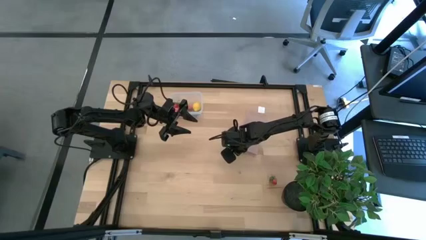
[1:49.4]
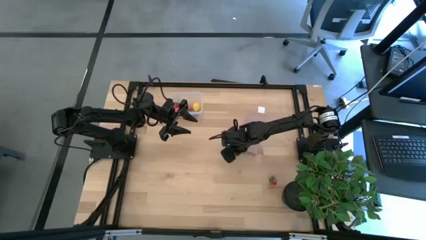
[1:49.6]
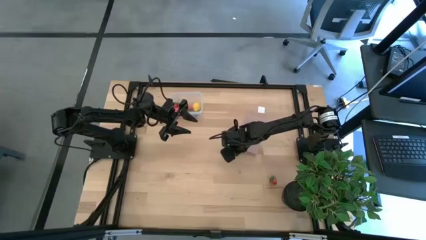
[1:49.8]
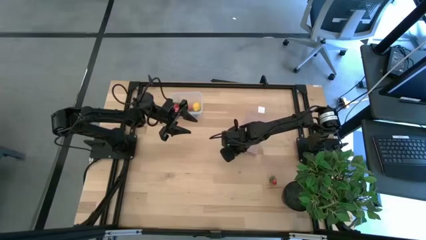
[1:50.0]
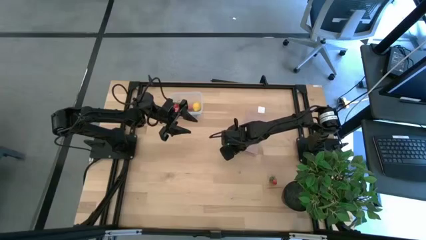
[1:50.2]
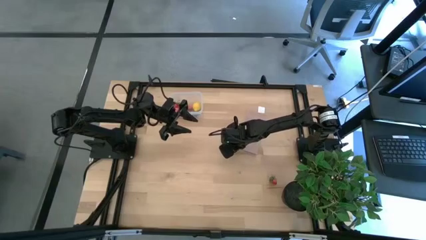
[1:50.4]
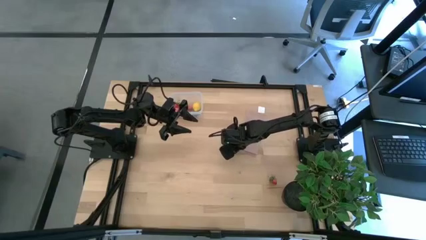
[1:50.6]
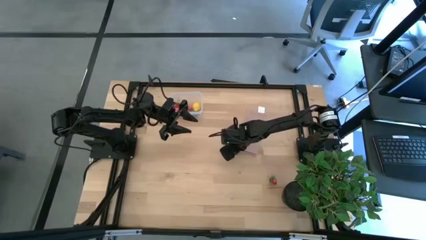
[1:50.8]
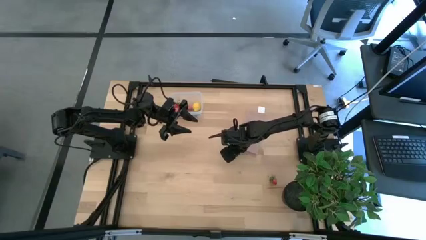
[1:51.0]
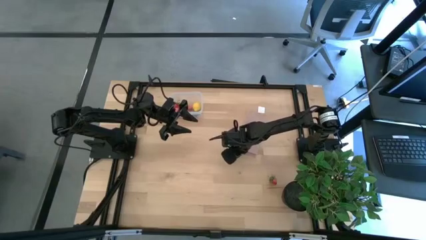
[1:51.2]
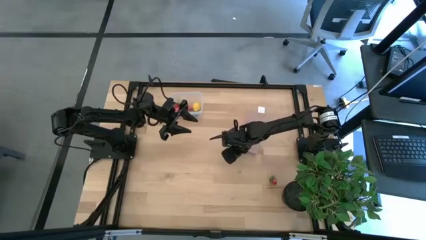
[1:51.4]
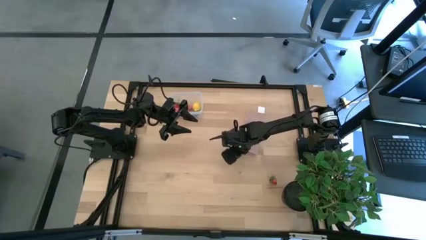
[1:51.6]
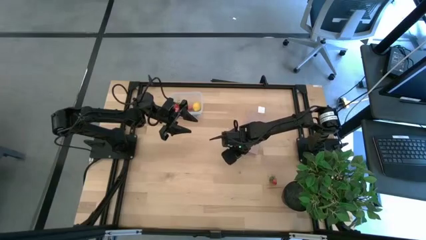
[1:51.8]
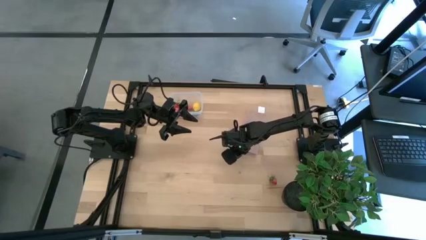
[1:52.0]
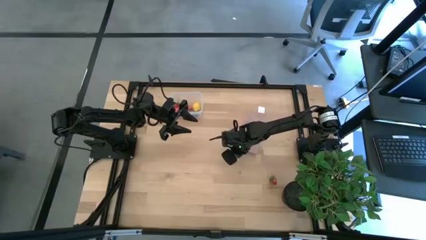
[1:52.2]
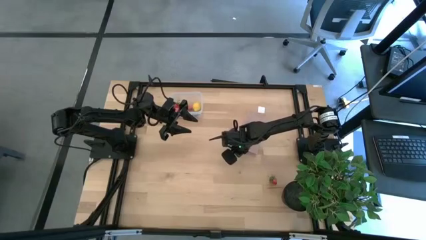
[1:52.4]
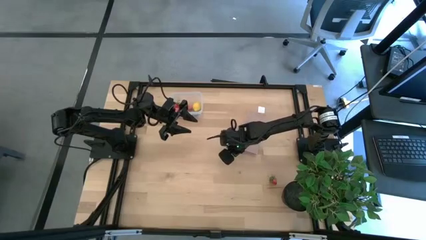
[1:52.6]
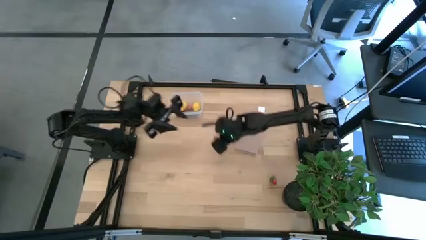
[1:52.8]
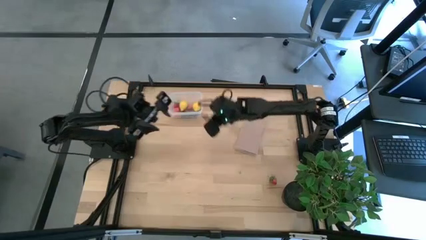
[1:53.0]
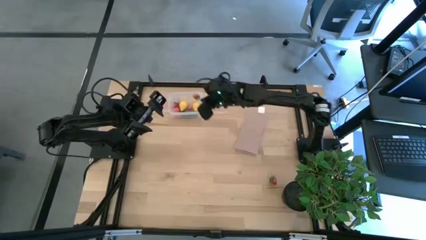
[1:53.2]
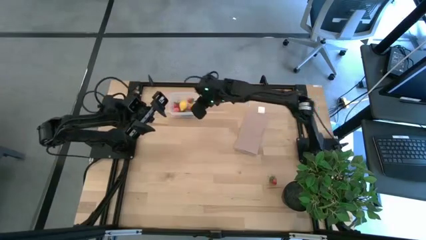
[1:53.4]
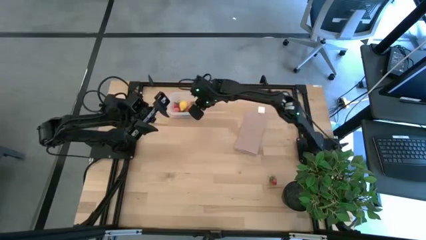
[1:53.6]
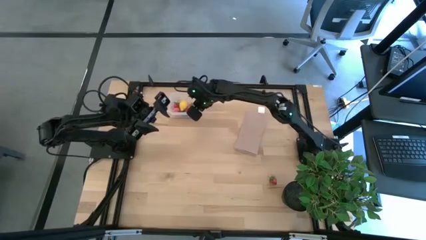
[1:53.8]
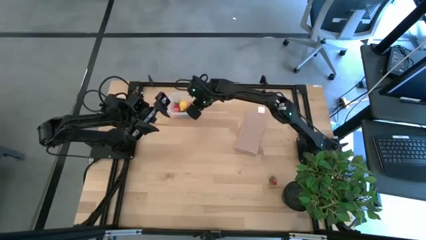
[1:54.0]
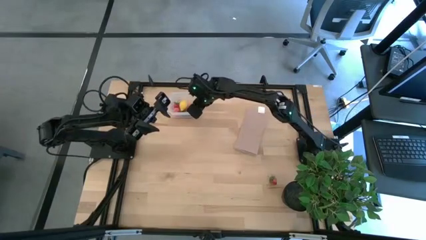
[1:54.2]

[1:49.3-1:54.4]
Task: Pick and placing Produce into tupperware
Put the strawberry into the transparent bin

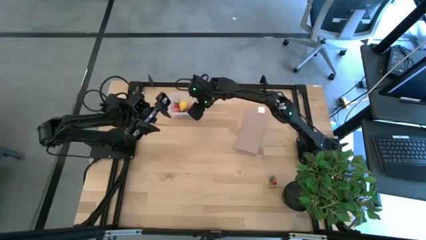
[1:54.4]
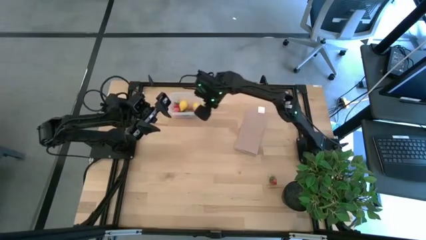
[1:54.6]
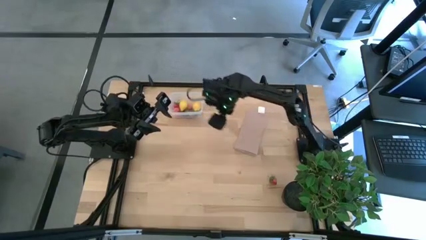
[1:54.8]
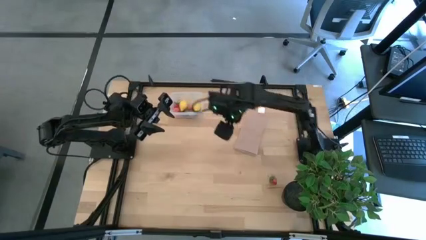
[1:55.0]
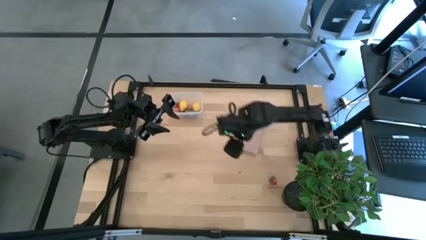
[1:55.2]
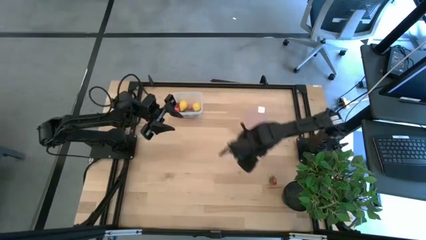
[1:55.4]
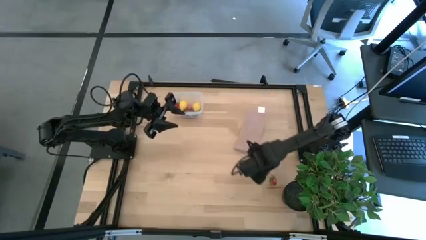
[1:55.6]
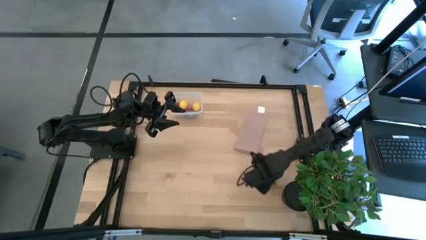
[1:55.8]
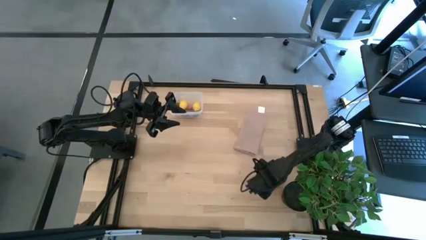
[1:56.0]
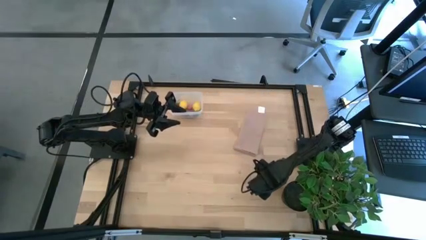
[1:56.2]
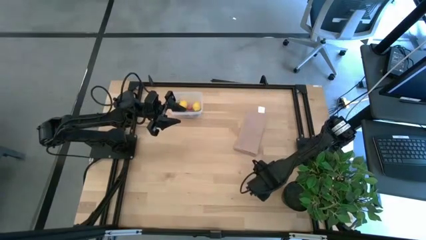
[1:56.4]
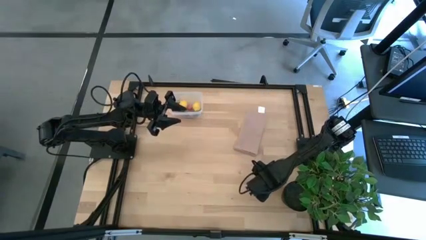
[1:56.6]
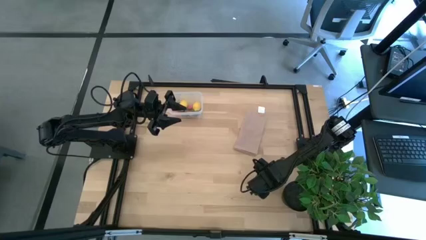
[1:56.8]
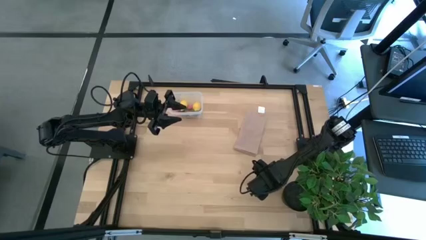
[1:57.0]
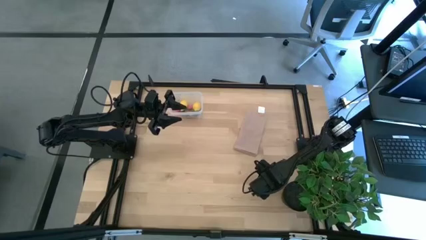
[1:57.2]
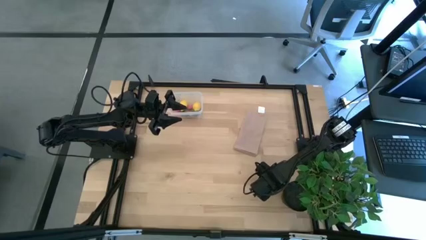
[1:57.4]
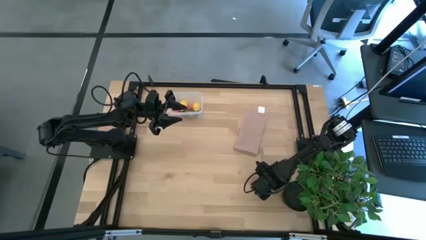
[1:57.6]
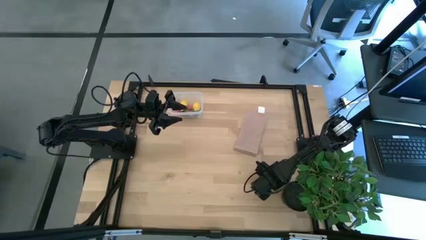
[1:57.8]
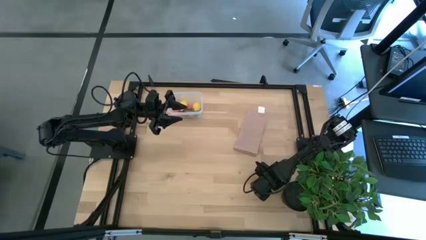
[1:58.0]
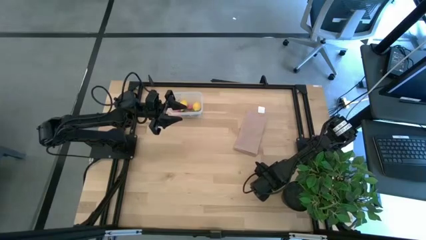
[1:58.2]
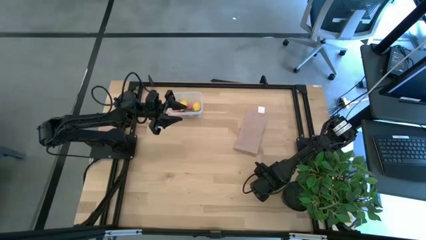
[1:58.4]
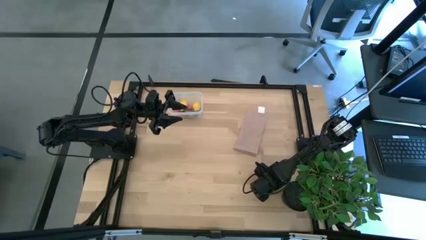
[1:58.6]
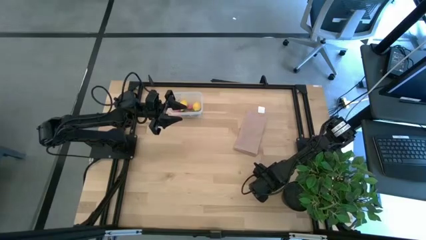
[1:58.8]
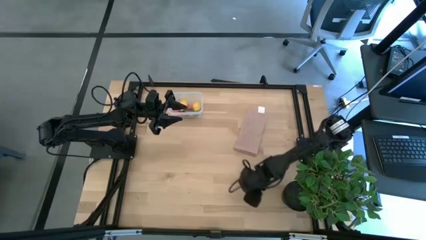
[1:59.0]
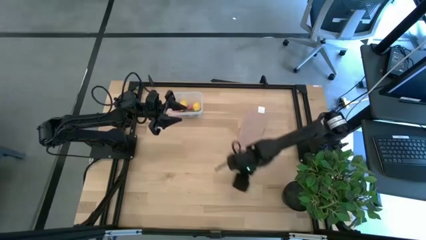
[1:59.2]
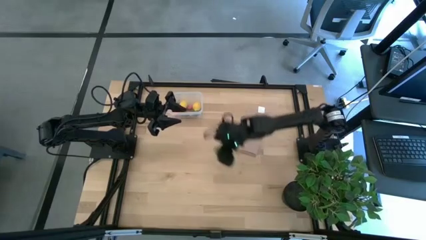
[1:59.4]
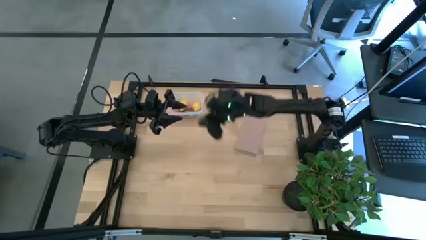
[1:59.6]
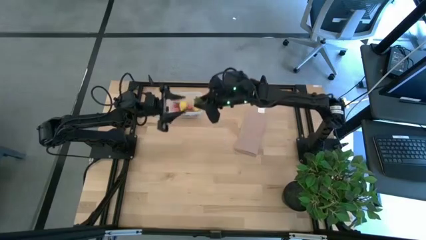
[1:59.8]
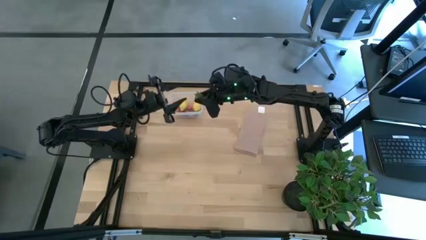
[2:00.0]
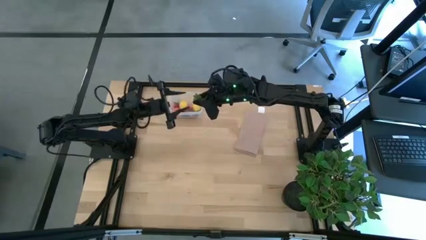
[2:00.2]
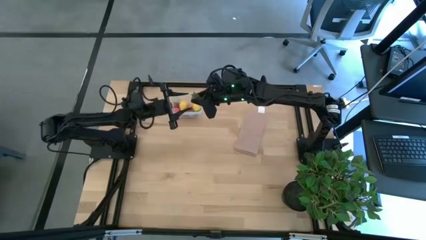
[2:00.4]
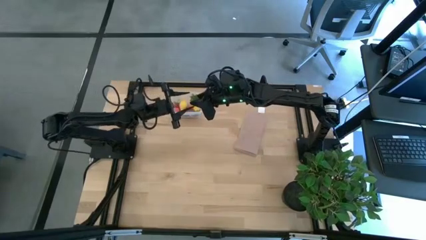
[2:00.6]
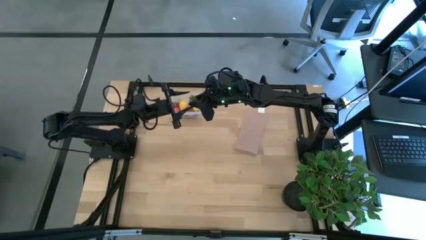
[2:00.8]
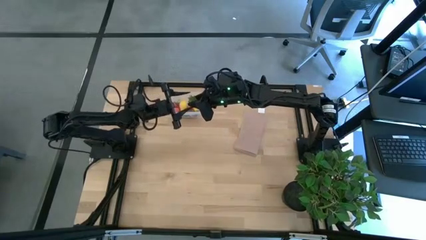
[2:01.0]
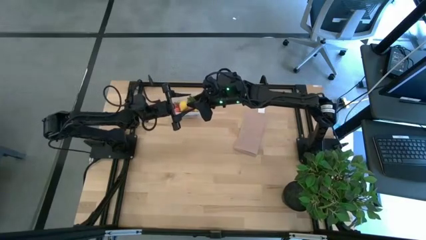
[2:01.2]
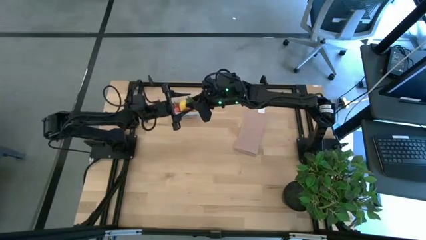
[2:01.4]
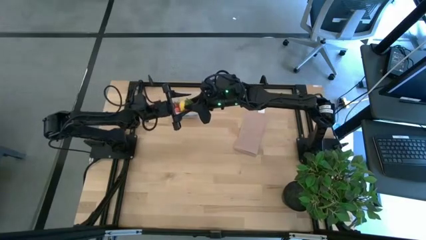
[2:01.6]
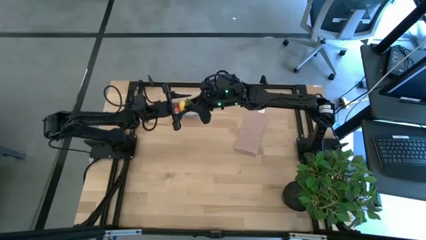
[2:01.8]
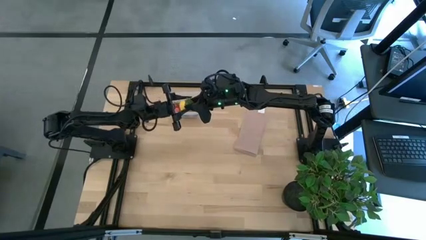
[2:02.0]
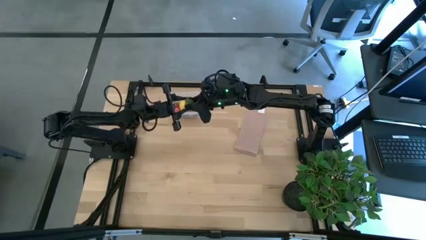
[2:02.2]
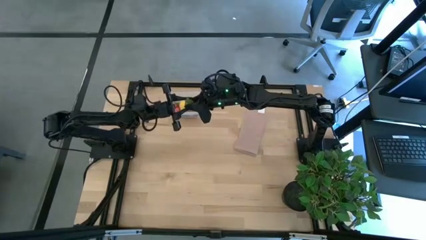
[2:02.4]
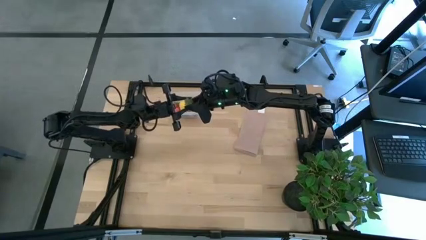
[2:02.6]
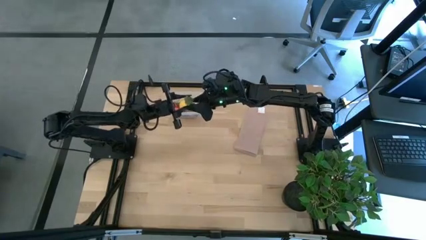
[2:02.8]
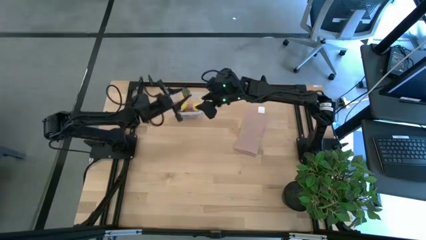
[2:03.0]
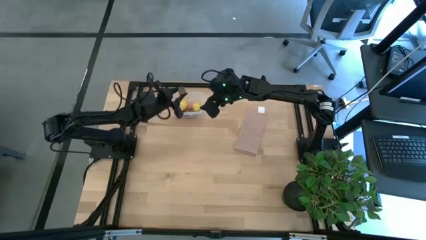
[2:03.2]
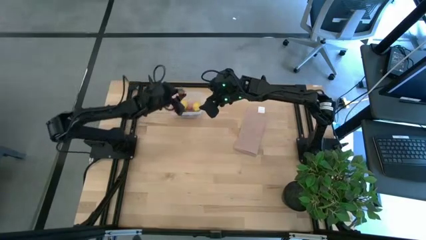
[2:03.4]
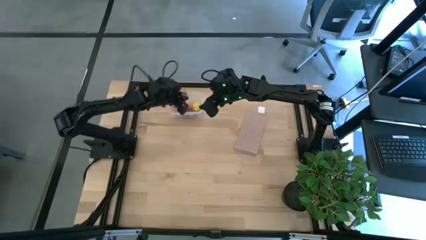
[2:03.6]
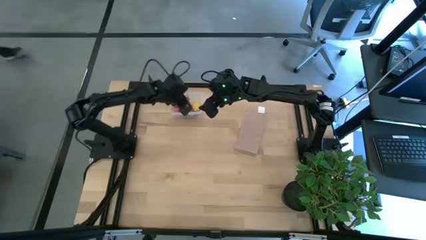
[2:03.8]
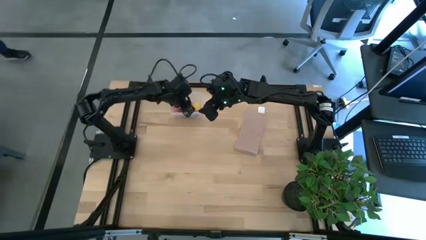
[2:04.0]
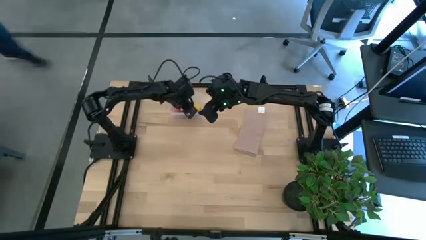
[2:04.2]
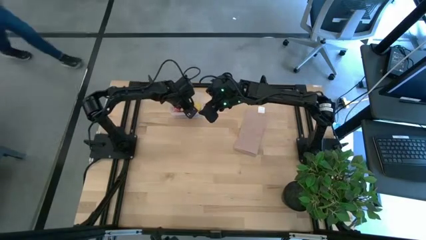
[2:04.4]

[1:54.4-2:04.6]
Put the strawberry into the transparent bin
